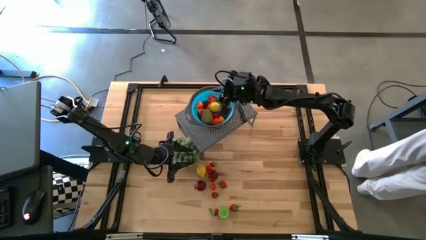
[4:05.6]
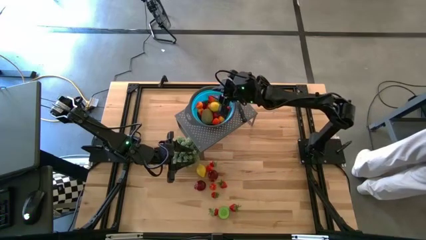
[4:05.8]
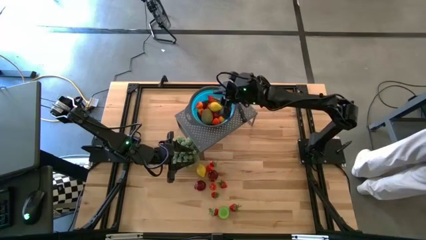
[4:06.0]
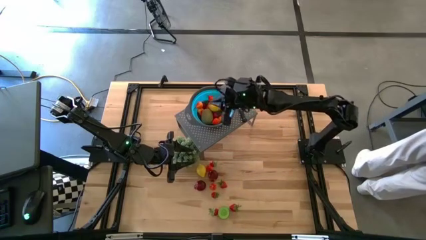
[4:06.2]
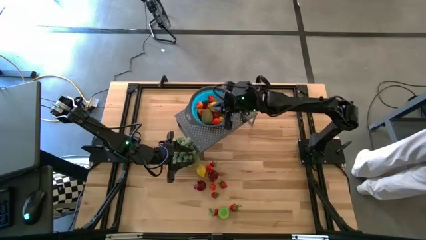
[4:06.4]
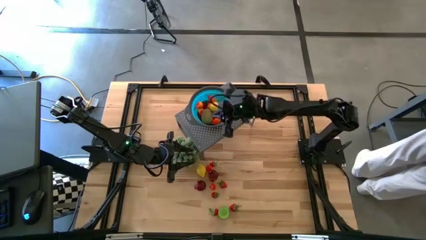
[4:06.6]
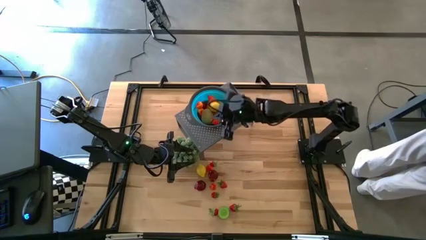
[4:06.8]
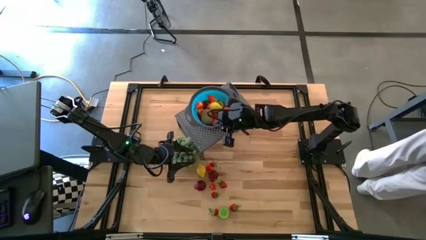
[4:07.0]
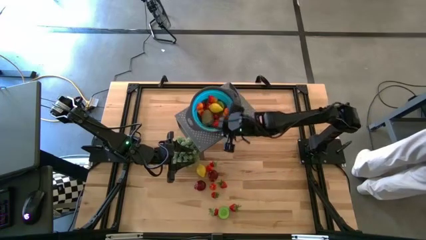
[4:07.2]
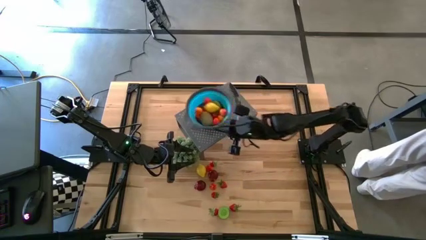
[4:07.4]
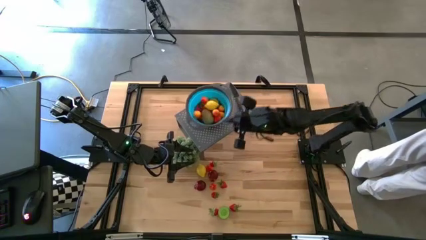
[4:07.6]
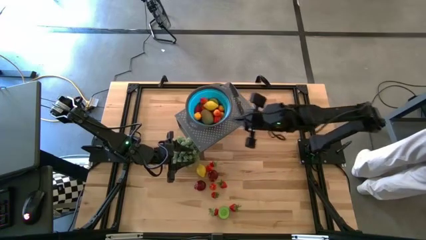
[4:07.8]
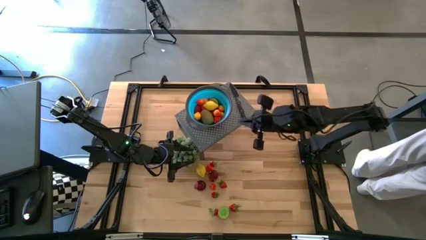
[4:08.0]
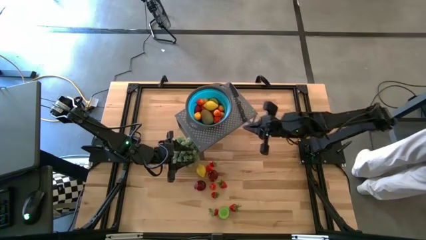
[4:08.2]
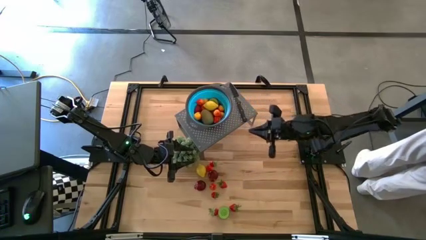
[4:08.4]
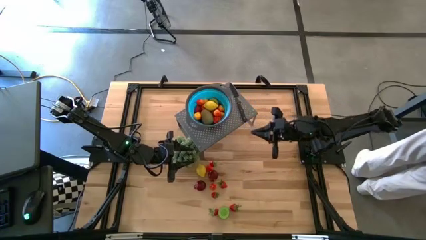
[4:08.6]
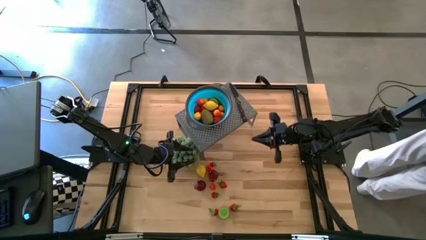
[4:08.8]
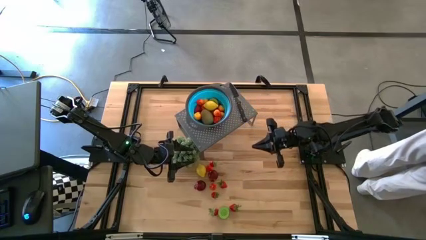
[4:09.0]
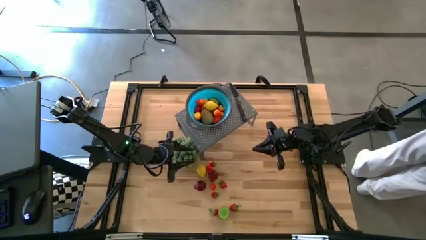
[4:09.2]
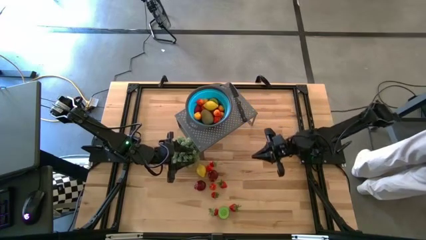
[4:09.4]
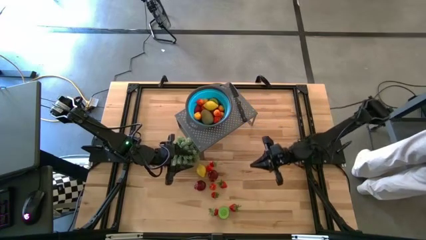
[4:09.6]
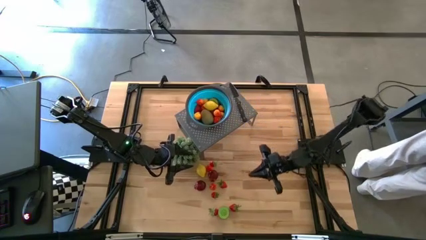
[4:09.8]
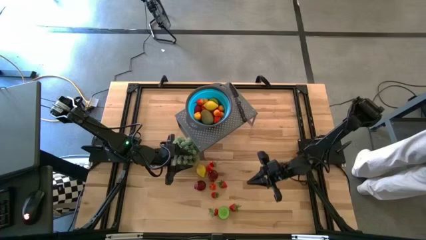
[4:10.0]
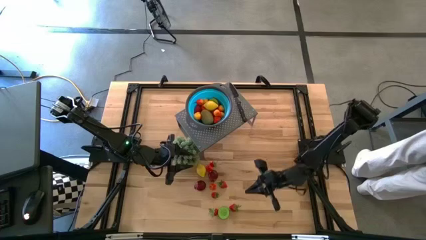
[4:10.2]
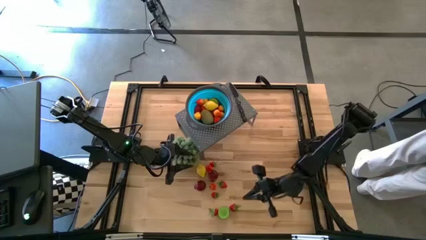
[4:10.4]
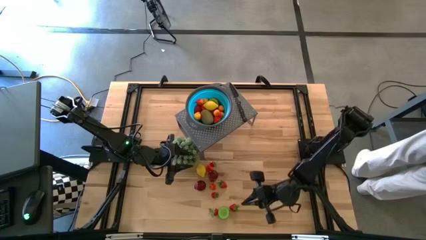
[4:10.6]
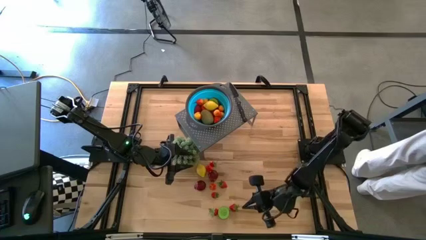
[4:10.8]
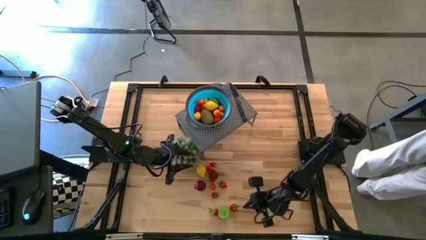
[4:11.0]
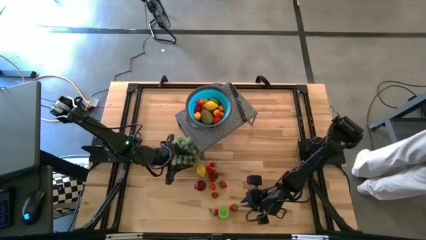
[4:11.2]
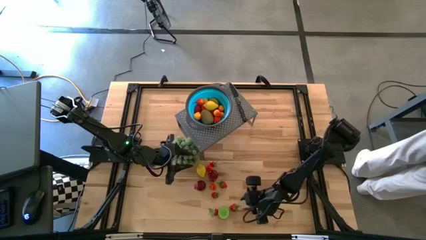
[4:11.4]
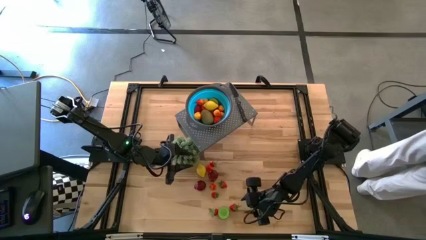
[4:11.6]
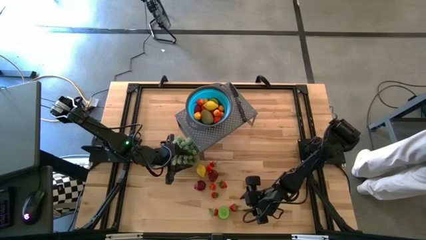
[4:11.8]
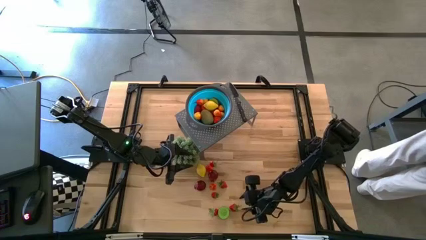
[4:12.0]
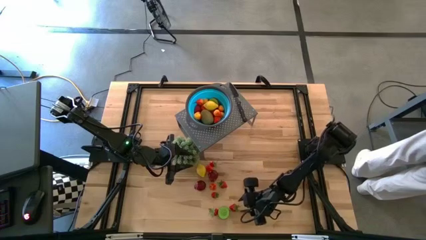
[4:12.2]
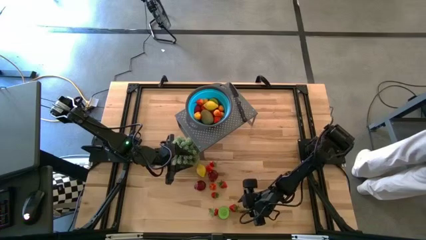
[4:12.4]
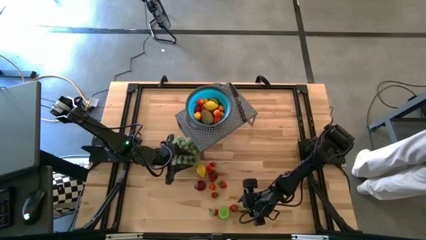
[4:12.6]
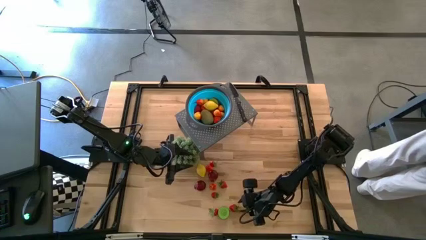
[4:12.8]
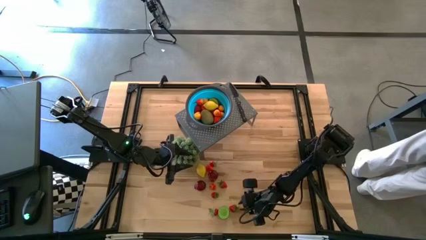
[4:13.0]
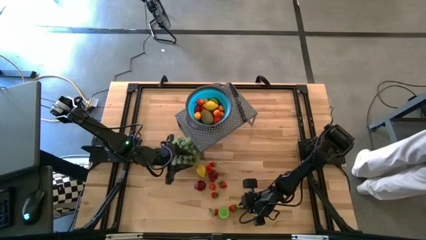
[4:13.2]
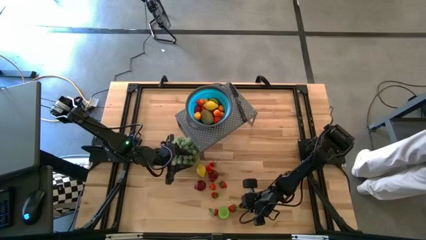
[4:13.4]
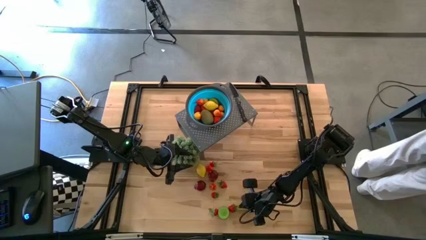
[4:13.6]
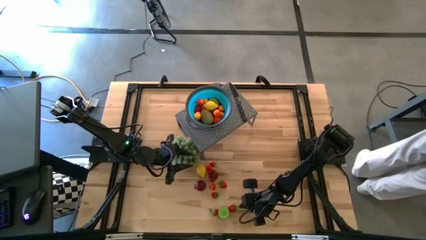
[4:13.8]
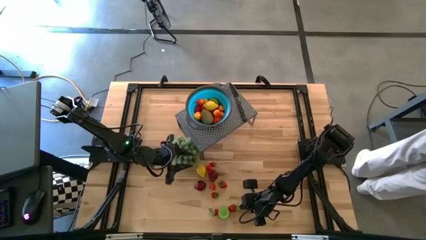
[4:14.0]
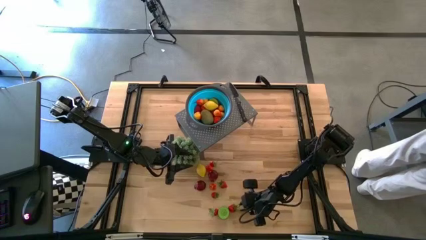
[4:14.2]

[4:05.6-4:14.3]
Task: Pick & Place Fruit
Put the strawberry into the blue strainer bowl on the shelf

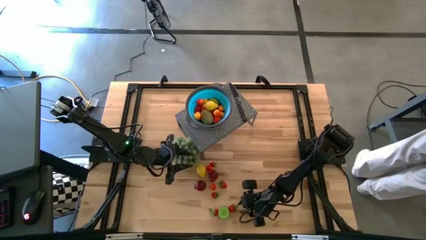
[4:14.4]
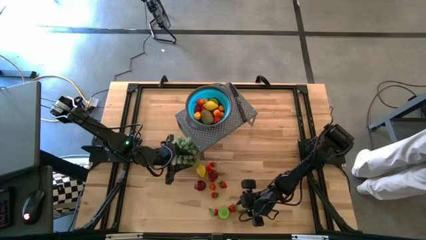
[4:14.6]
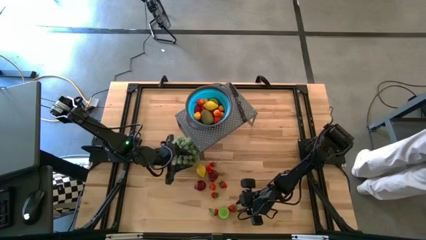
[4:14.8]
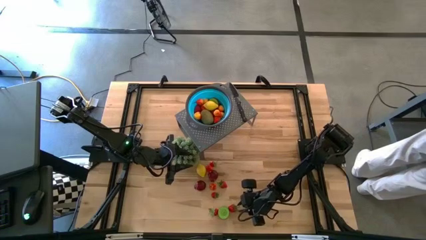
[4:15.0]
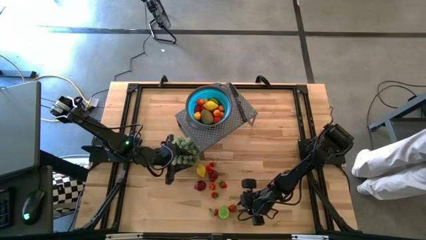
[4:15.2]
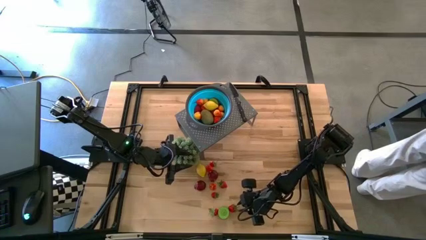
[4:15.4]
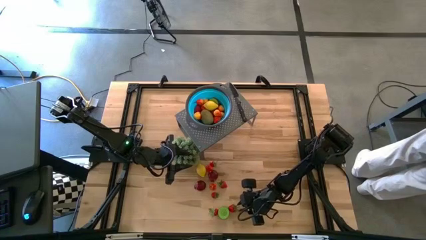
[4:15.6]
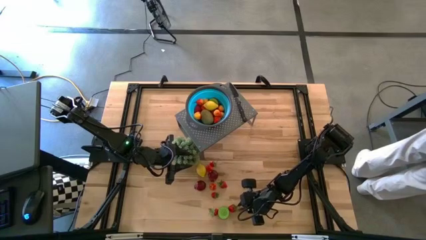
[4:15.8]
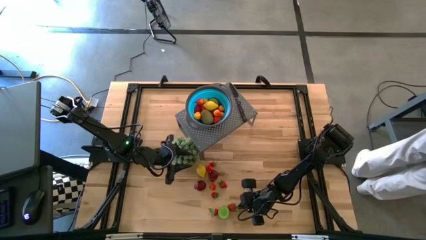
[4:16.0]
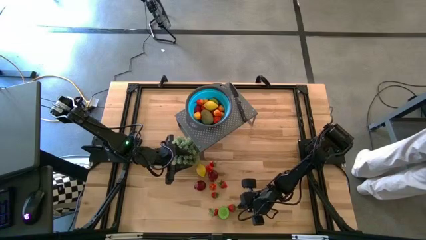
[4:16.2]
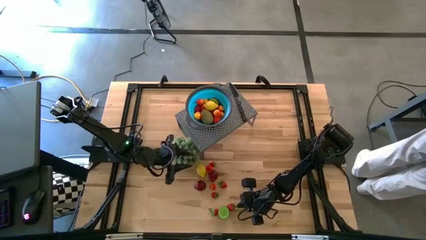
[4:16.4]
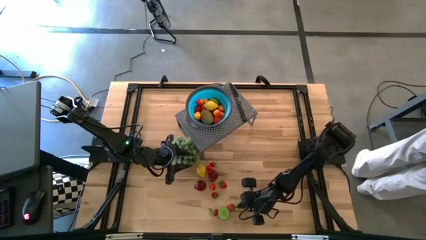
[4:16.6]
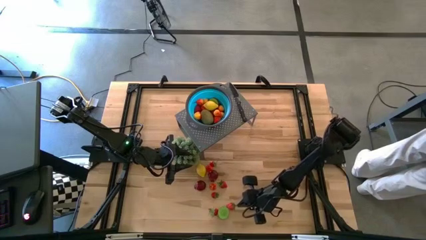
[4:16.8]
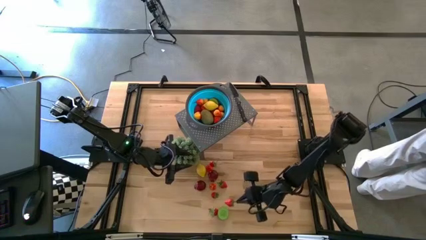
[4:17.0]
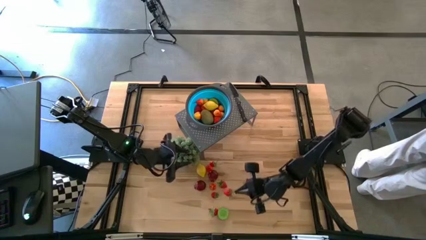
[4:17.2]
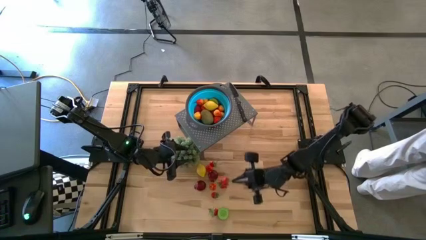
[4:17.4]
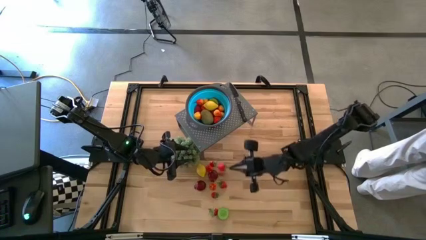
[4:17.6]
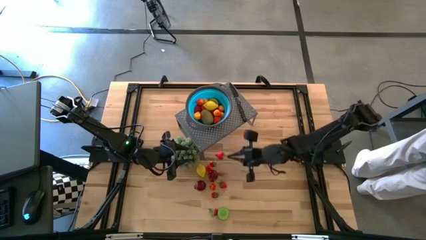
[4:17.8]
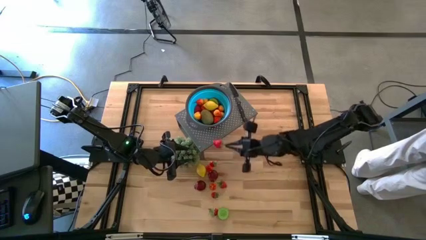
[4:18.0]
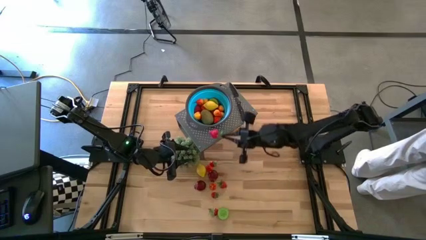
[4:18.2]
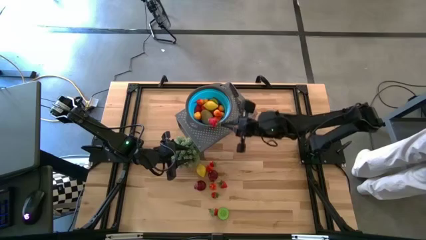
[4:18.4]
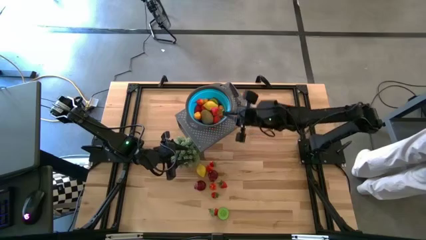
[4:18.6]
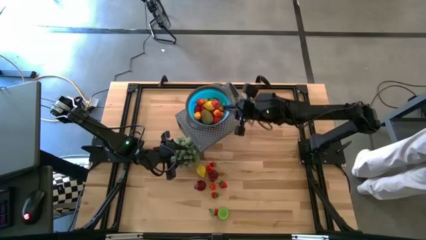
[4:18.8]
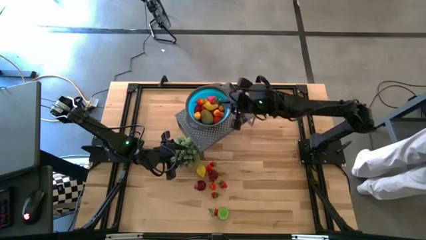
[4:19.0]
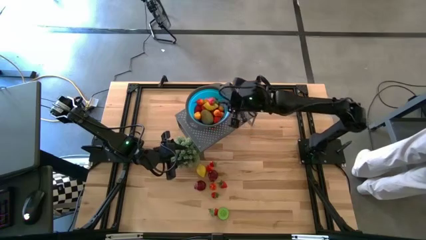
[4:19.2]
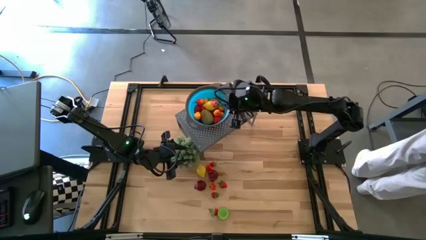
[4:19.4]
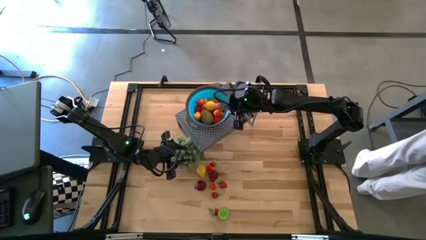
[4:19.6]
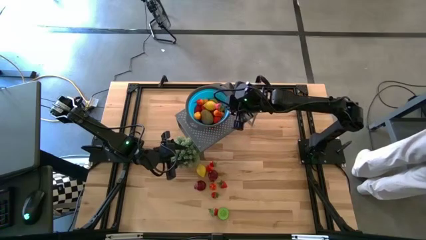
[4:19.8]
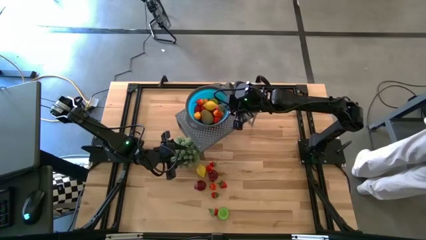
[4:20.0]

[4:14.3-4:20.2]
Put the strawberry into the blue strainer bowl on the shelf
